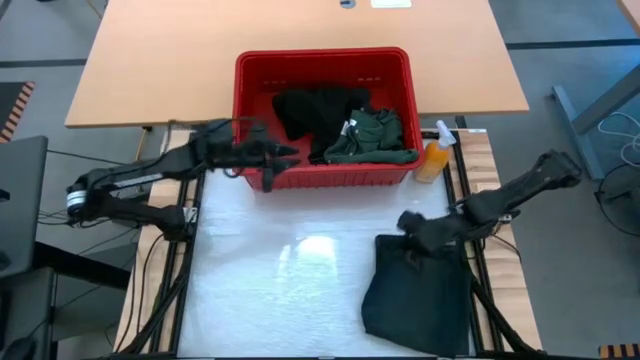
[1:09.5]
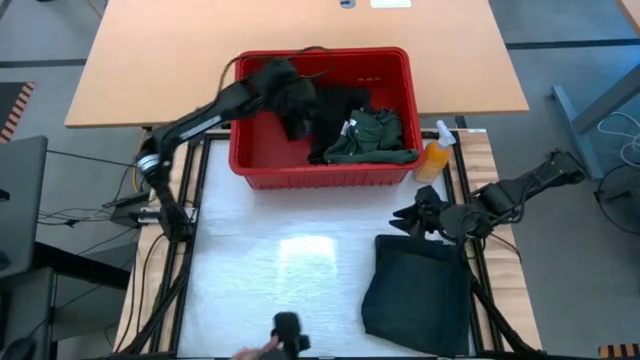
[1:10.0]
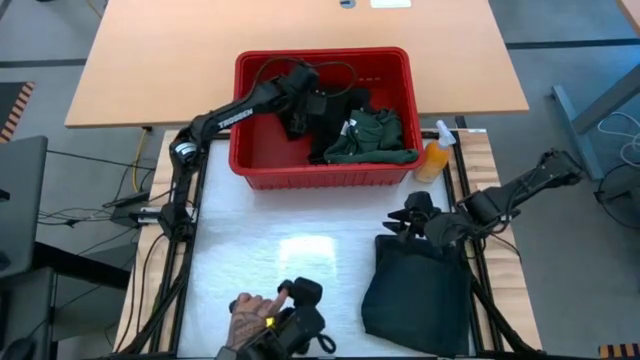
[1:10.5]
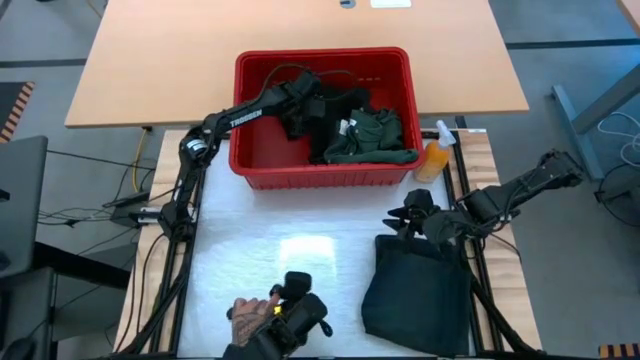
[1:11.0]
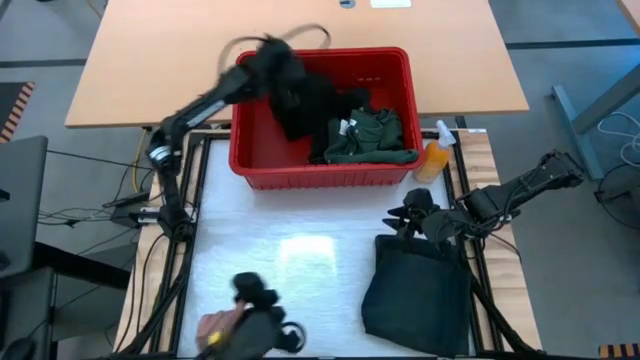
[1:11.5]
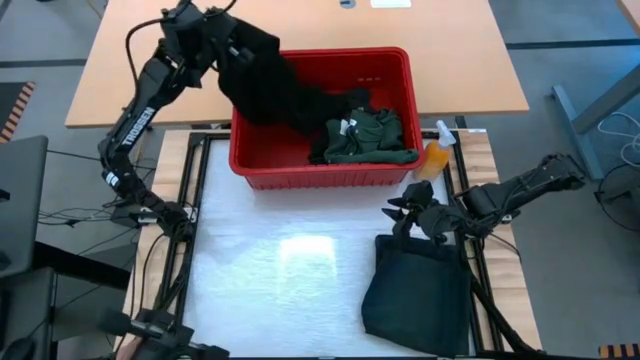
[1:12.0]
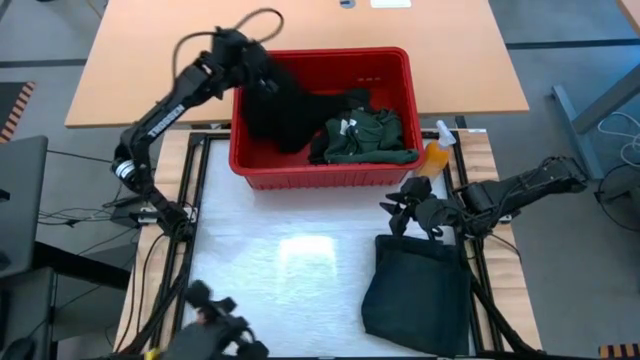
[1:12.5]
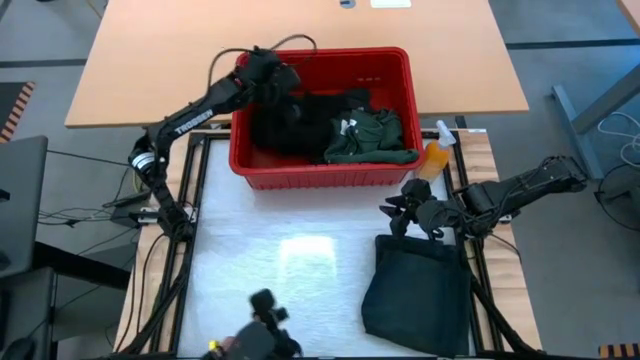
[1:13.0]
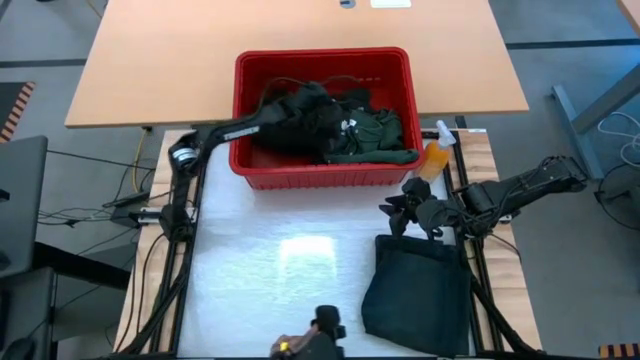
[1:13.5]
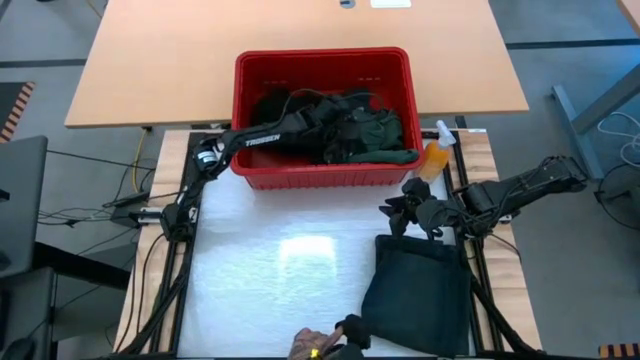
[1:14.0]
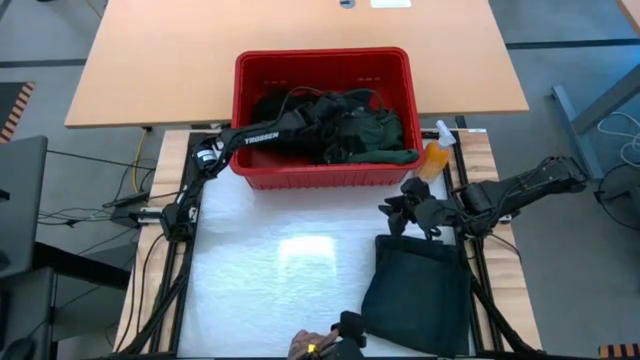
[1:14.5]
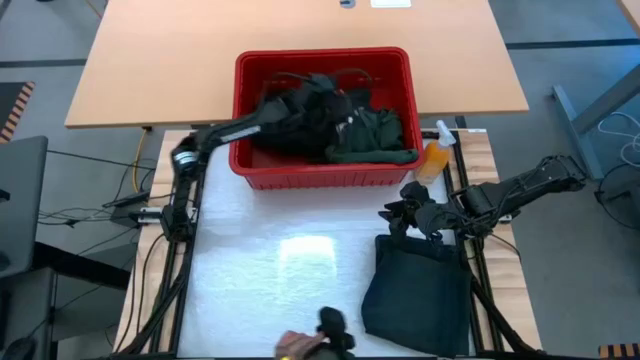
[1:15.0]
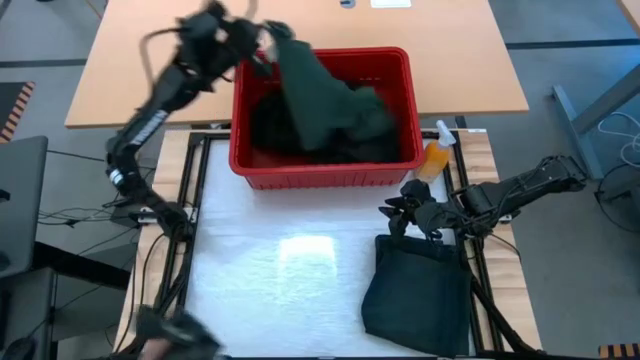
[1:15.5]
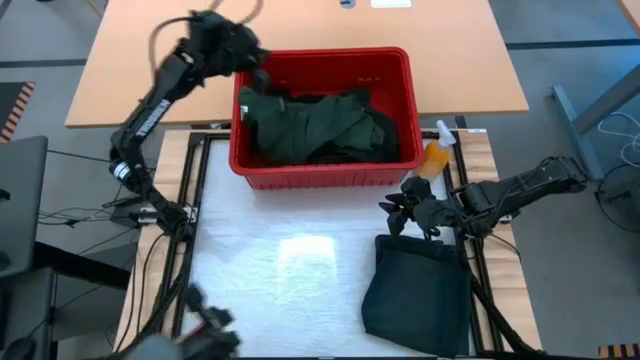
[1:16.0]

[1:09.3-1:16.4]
Task: Fold laundry
Remove the gray shorts from the red bin

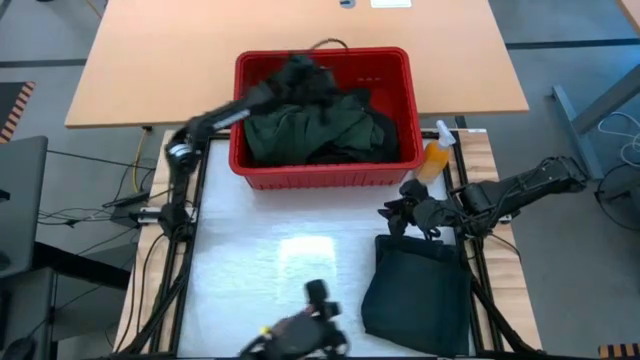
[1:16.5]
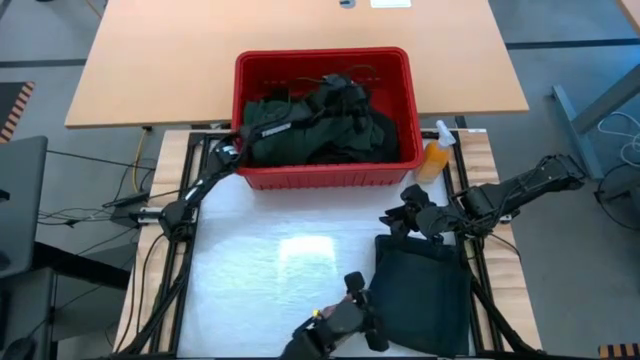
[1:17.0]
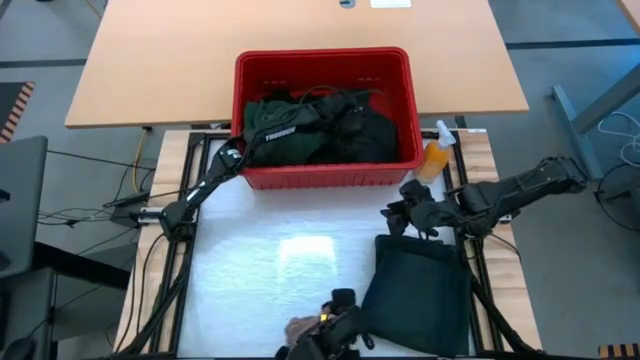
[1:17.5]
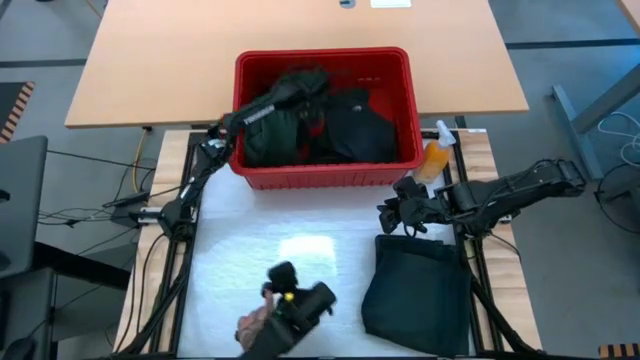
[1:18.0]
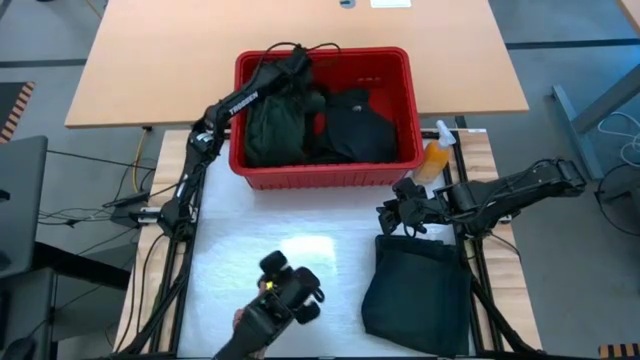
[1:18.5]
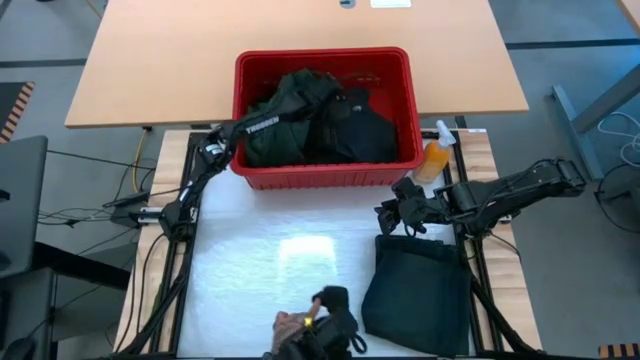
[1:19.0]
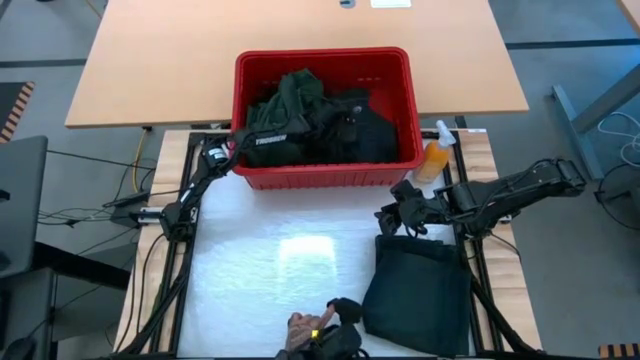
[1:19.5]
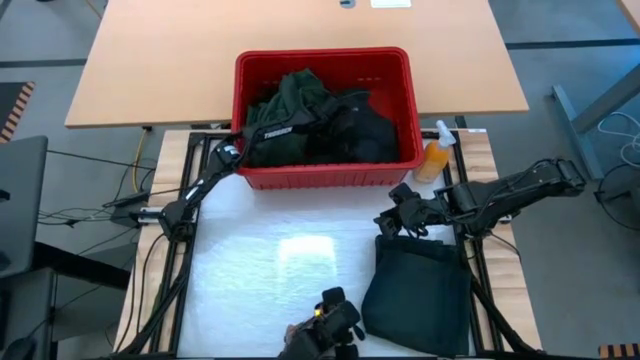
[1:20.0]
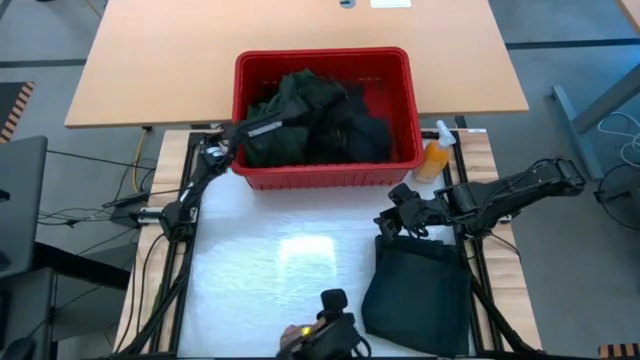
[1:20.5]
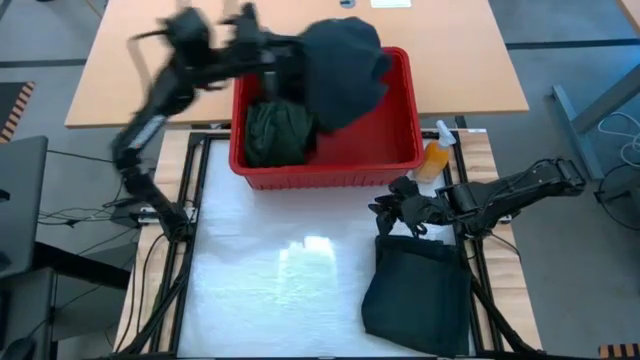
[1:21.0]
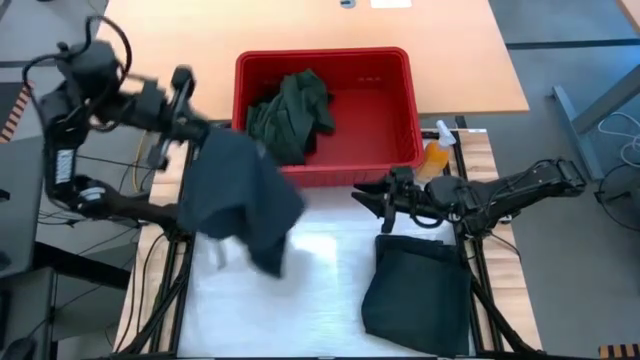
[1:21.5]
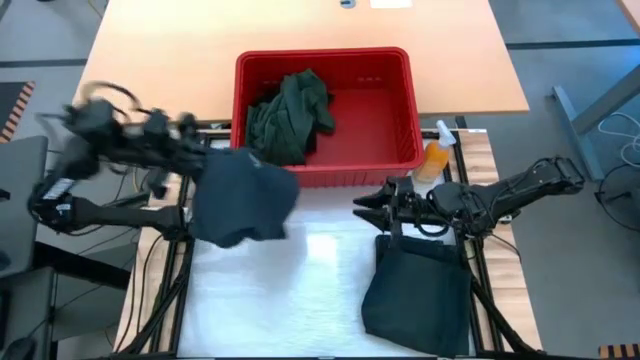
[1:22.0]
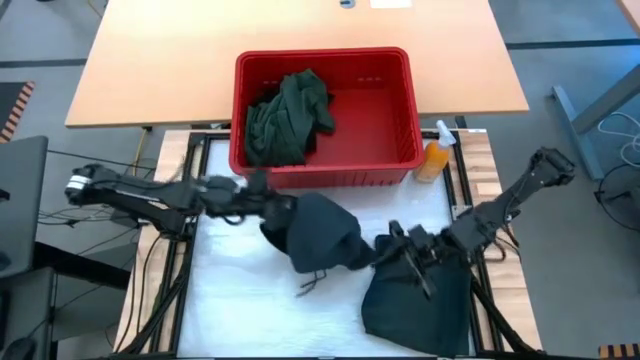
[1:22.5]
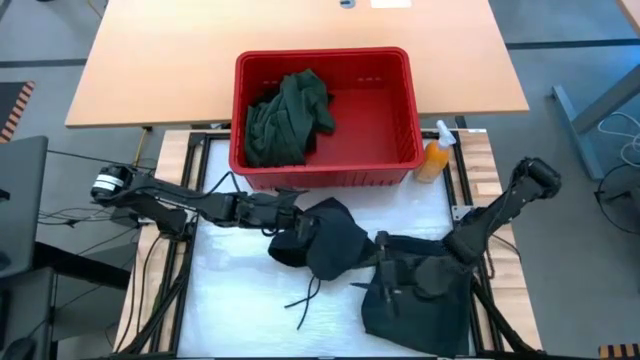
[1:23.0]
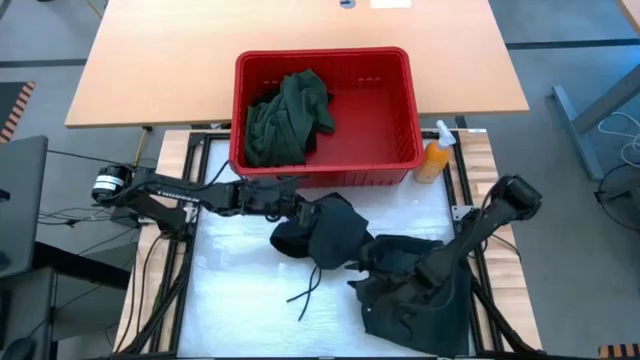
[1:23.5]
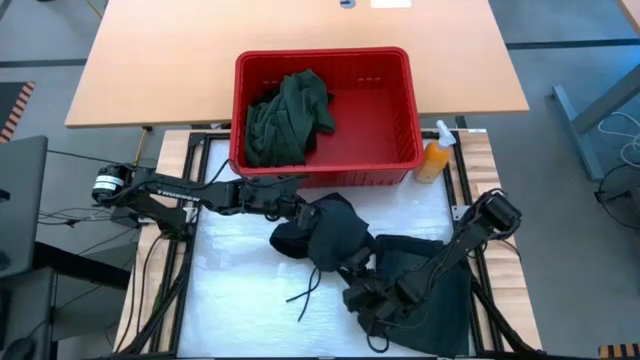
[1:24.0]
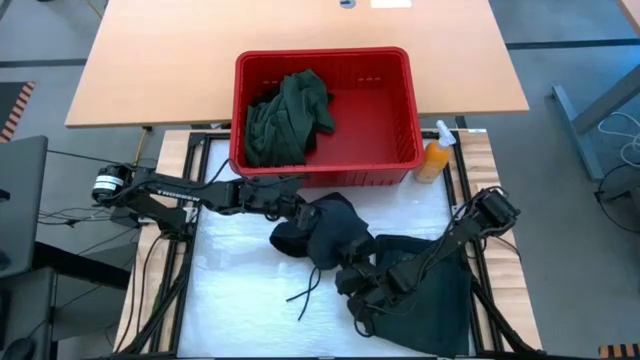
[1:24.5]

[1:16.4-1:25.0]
Remove the gray shorts from the red bin

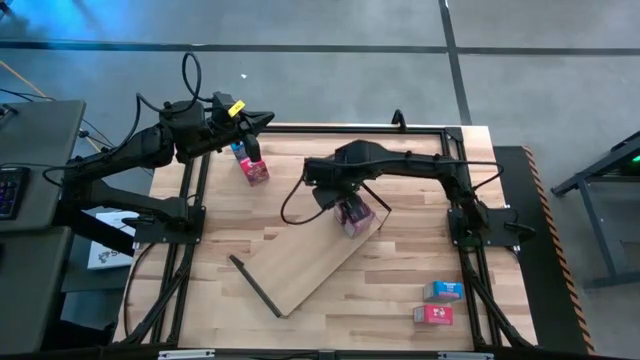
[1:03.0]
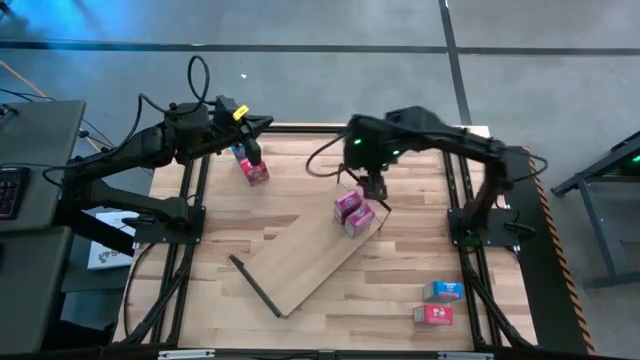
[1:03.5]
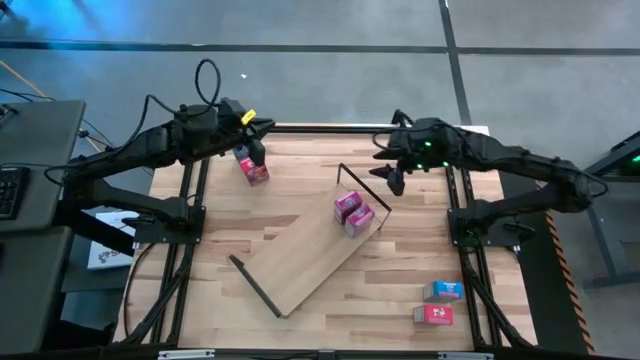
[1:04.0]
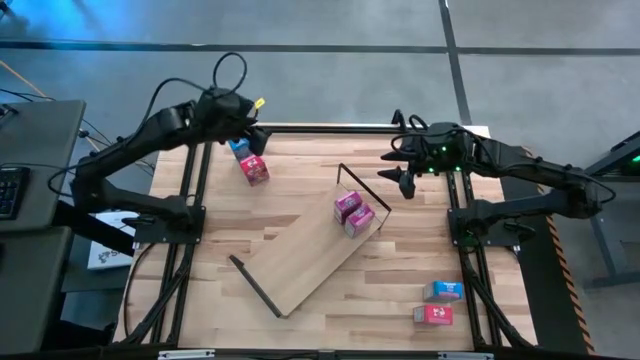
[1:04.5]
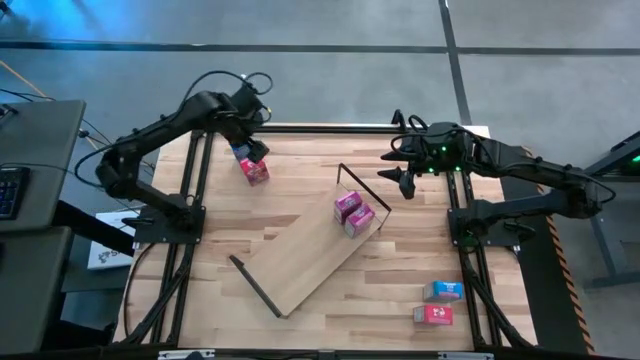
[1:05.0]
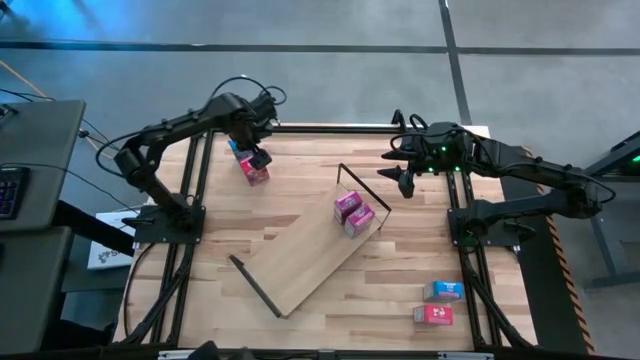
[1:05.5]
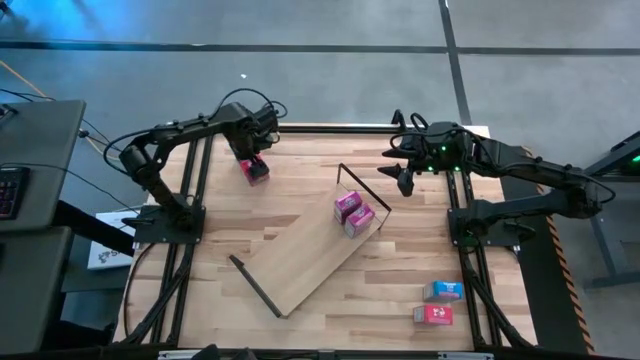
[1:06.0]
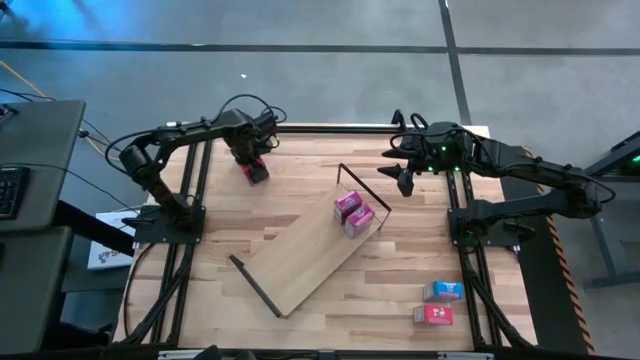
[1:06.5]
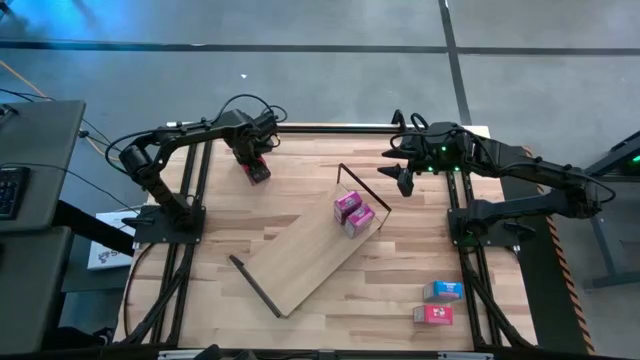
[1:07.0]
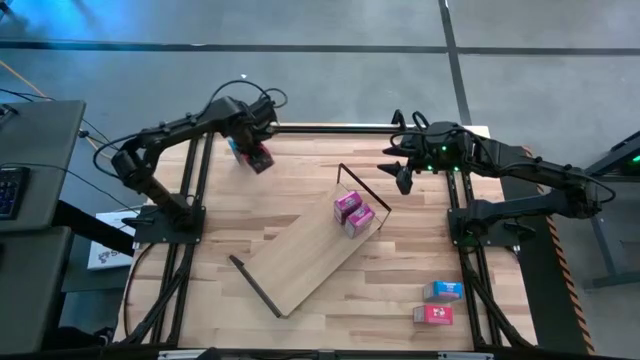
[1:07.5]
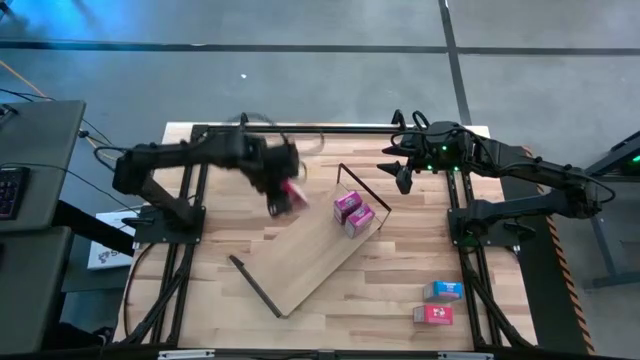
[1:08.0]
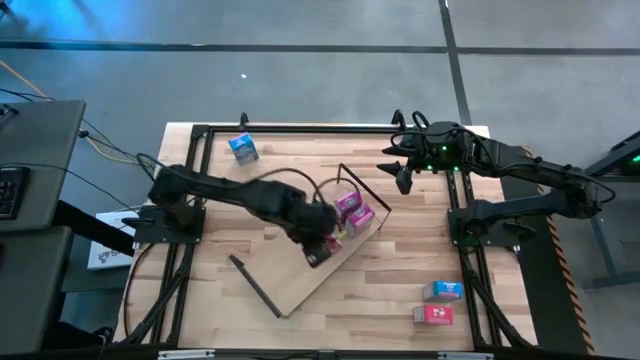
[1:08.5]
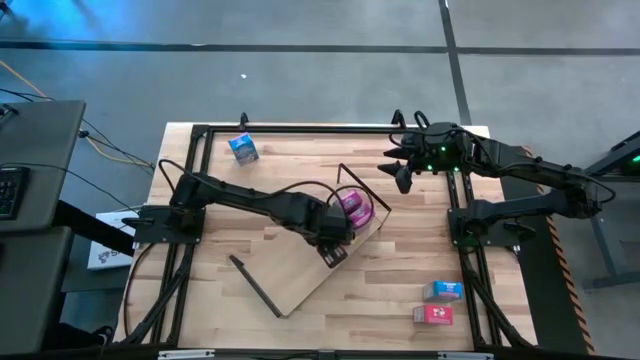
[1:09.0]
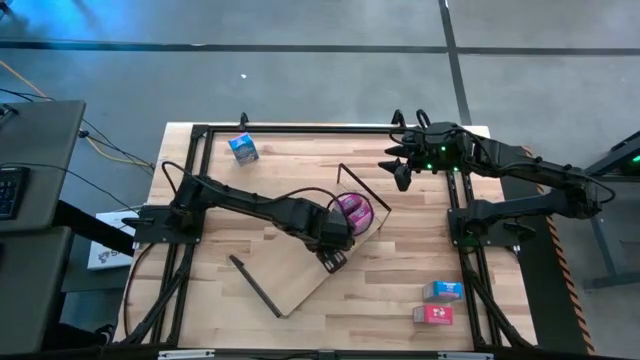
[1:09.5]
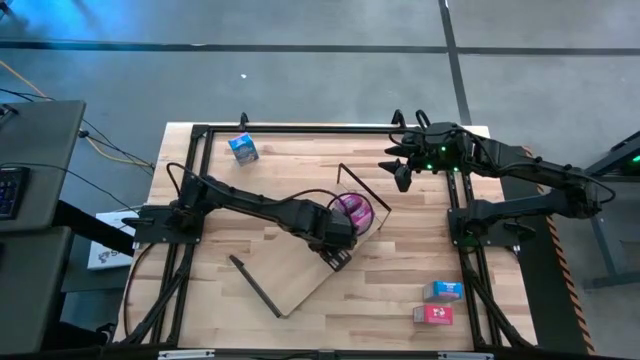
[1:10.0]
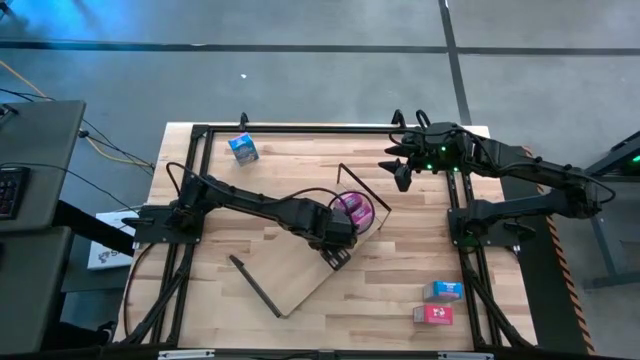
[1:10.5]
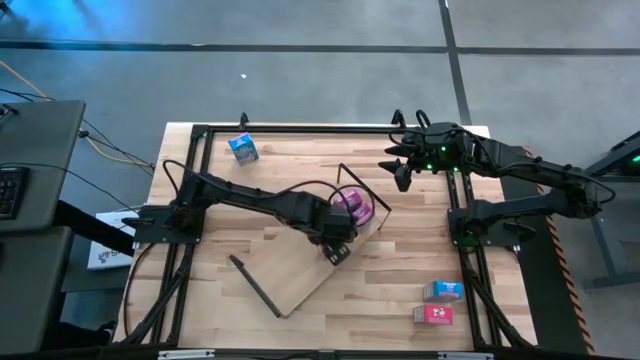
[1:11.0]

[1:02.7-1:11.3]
Task: Stack cereal on shelf
Put the top red cereal box on the shelf
